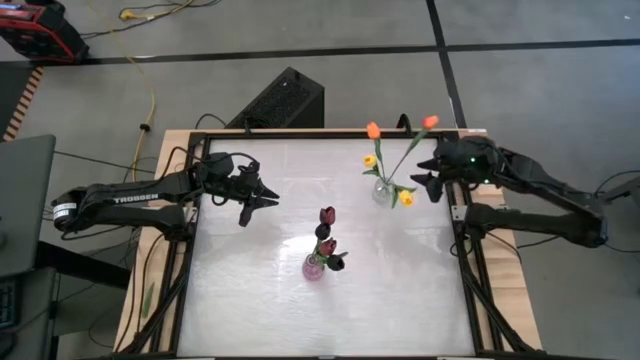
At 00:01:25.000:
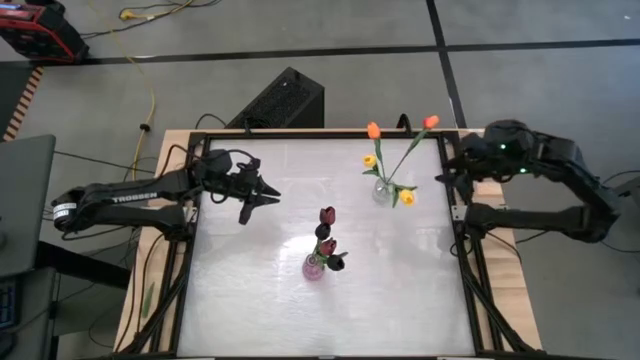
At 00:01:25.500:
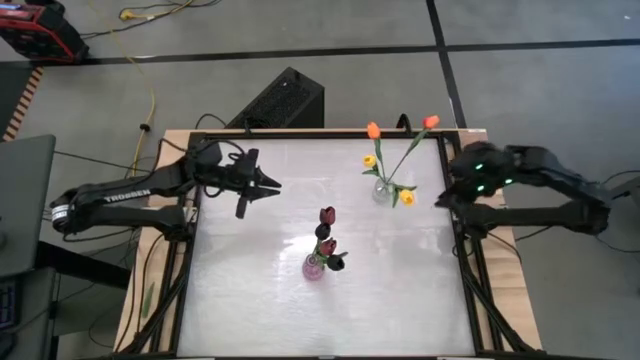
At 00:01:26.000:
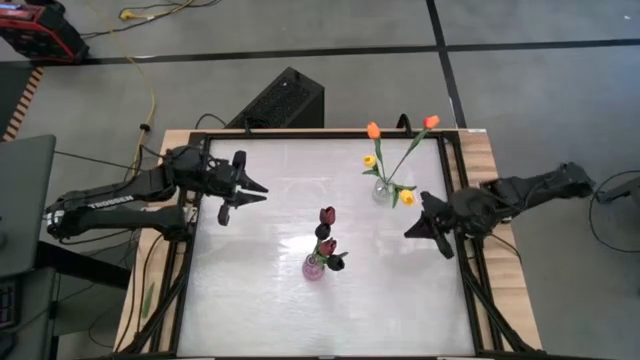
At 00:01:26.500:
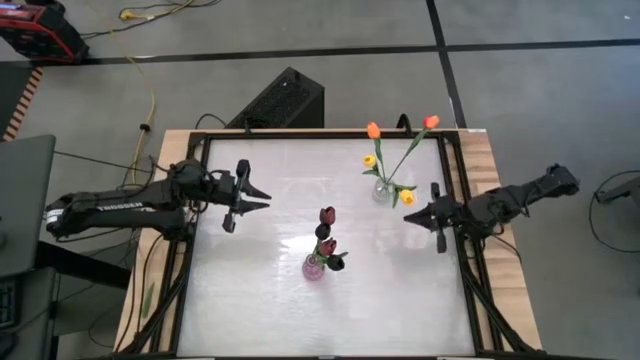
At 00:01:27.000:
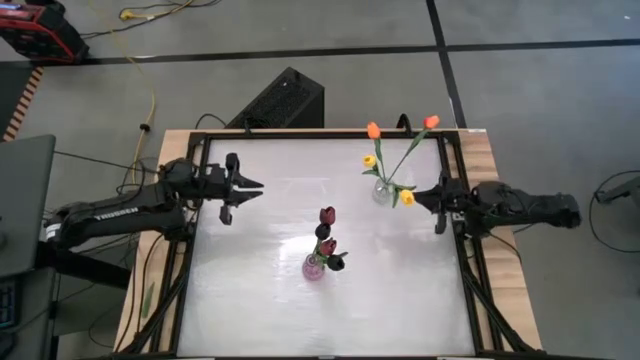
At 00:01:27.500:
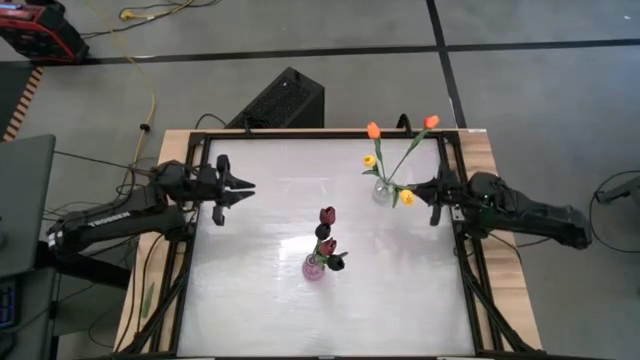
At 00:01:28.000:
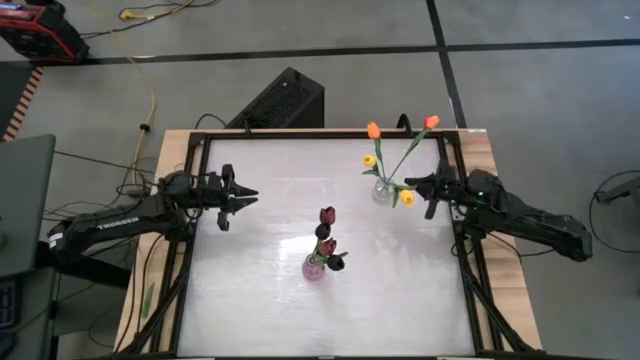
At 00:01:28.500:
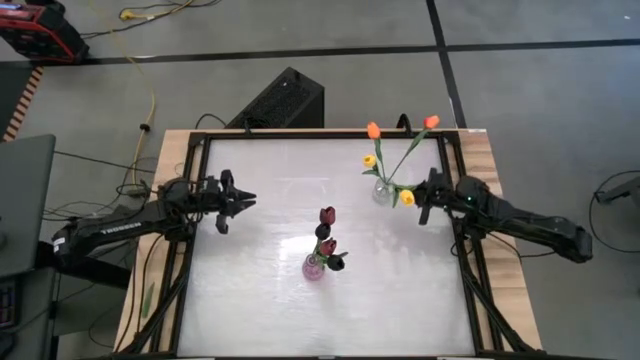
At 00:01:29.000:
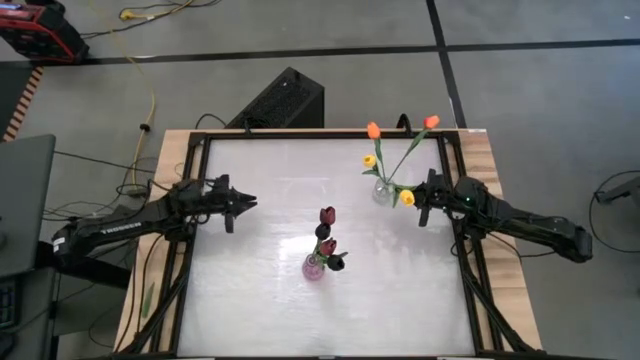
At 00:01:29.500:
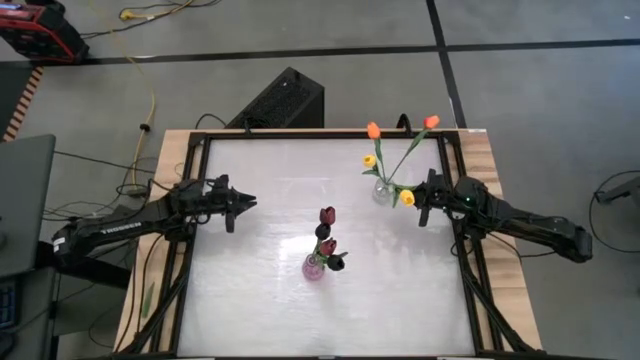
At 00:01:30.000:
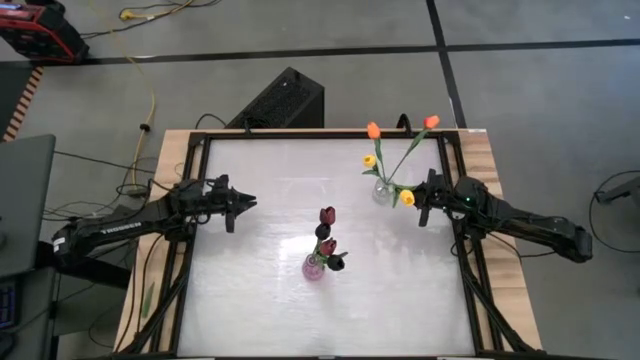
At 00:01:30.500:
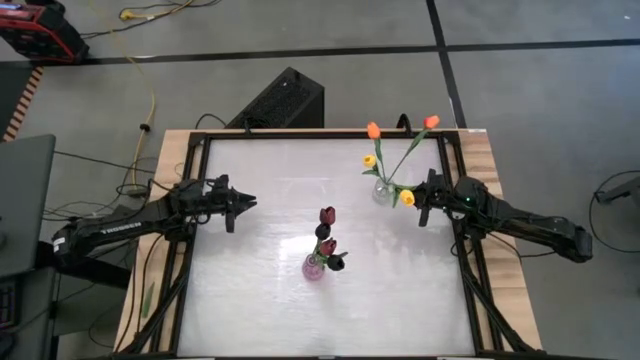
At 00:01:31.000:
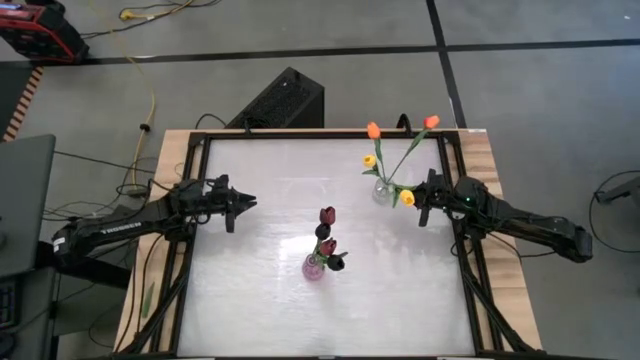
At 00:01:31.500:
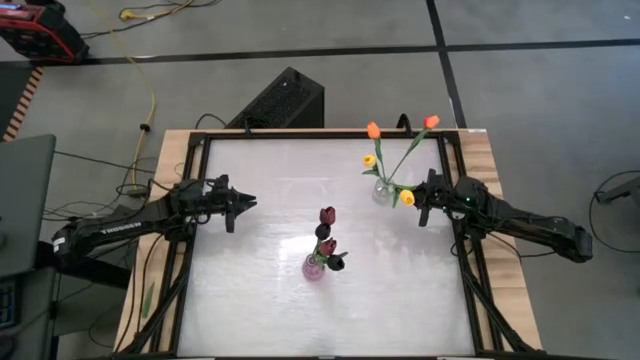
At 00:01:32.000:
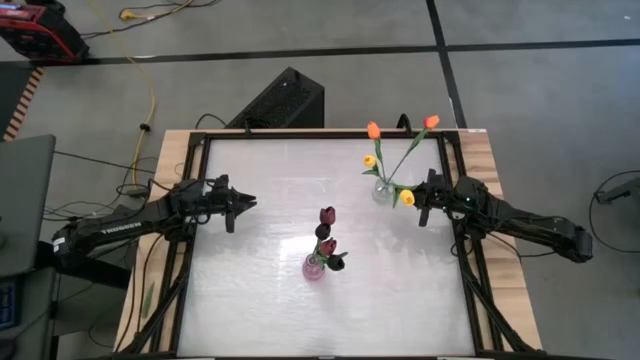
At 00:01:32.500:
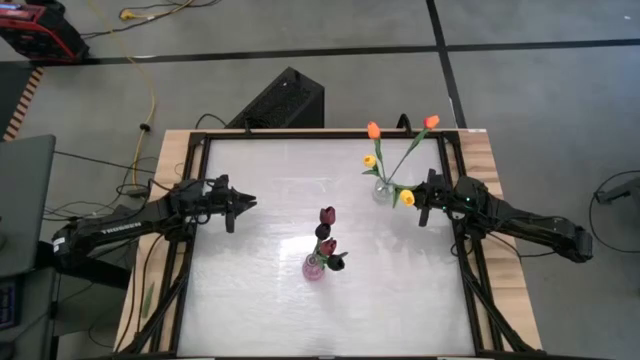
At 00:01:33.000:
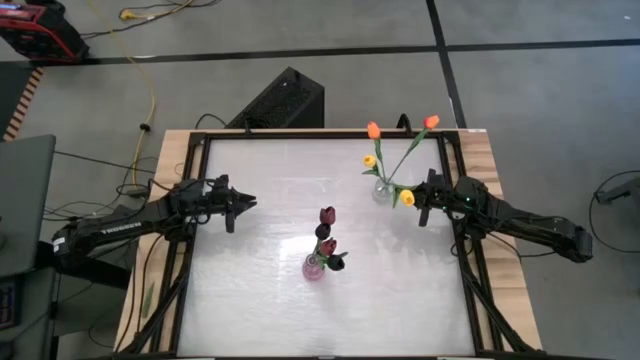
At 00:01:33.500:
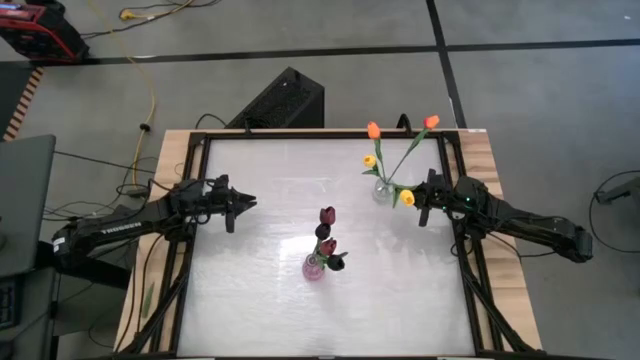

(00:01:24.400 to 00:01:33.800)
Task: Sort flowers into vase by color
Return to Home Position

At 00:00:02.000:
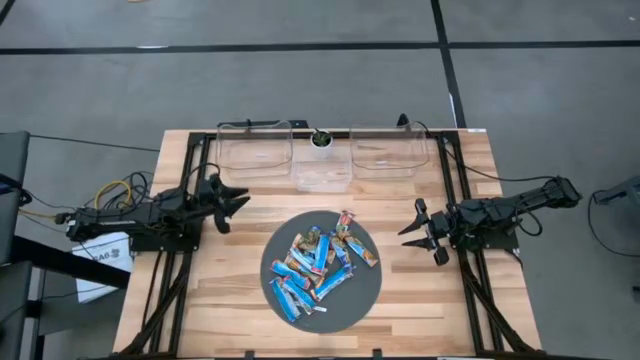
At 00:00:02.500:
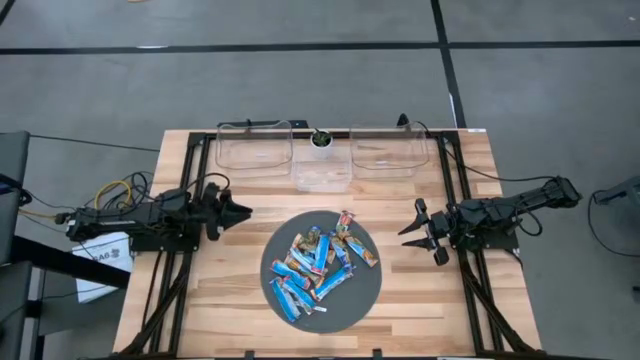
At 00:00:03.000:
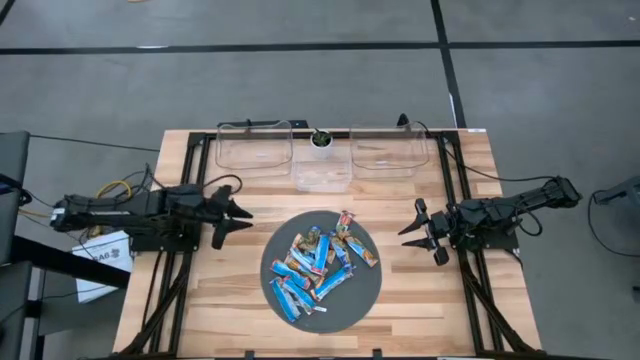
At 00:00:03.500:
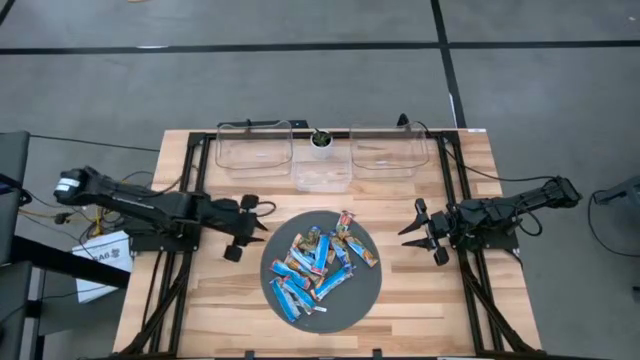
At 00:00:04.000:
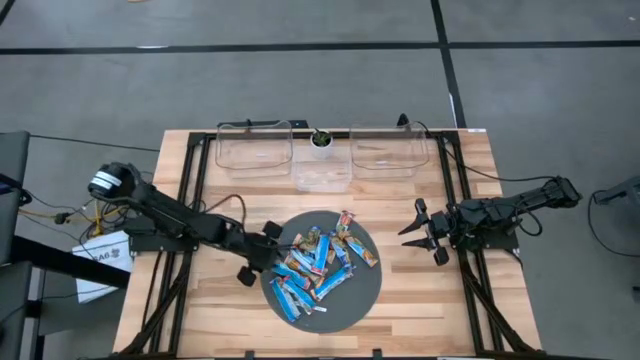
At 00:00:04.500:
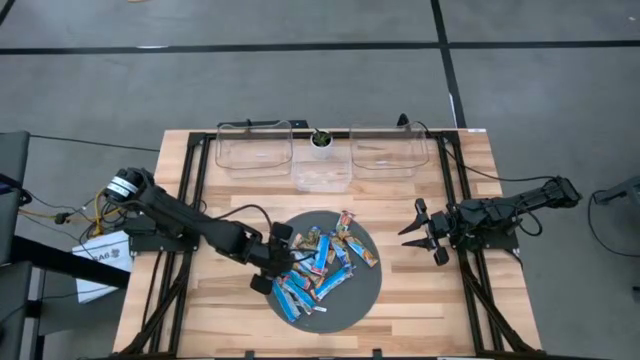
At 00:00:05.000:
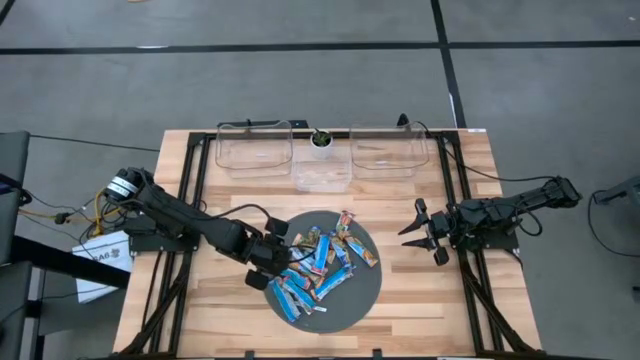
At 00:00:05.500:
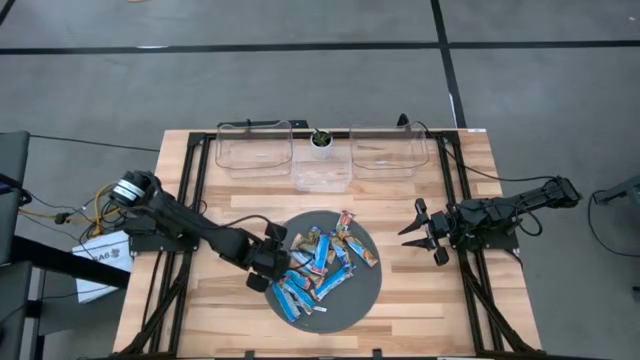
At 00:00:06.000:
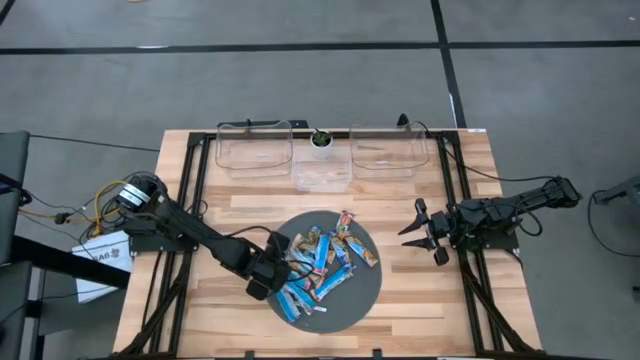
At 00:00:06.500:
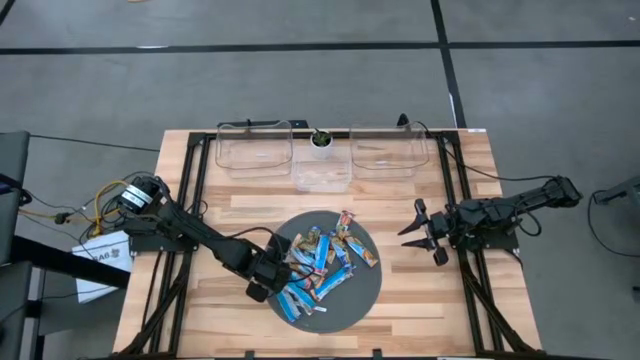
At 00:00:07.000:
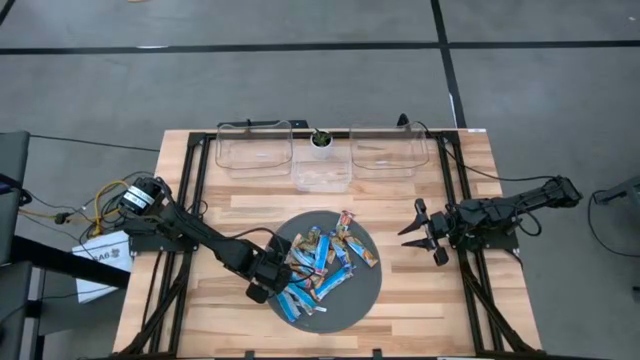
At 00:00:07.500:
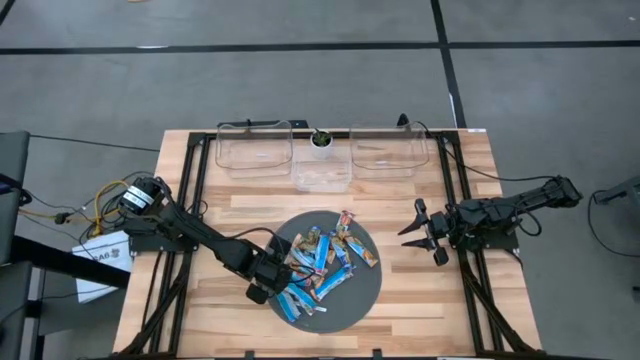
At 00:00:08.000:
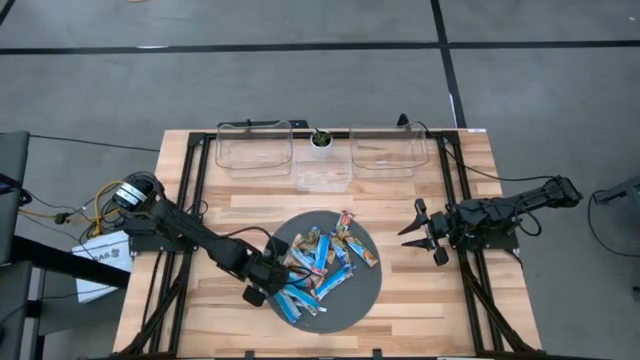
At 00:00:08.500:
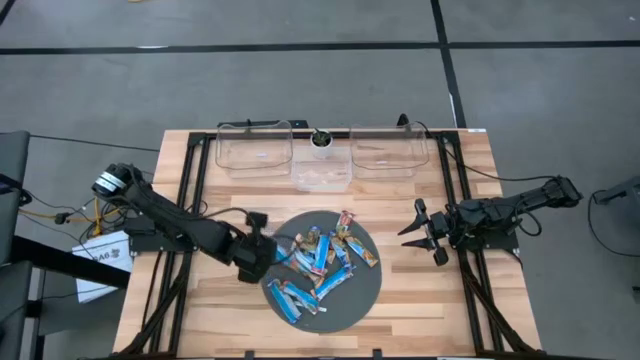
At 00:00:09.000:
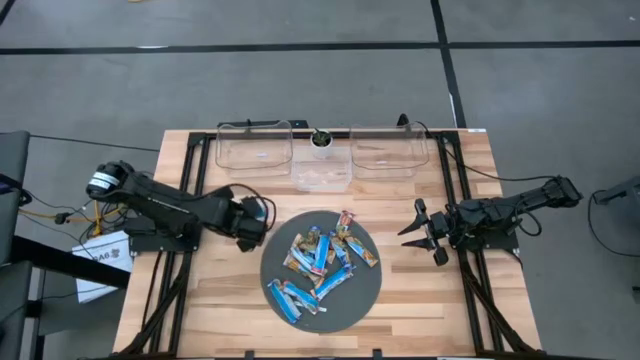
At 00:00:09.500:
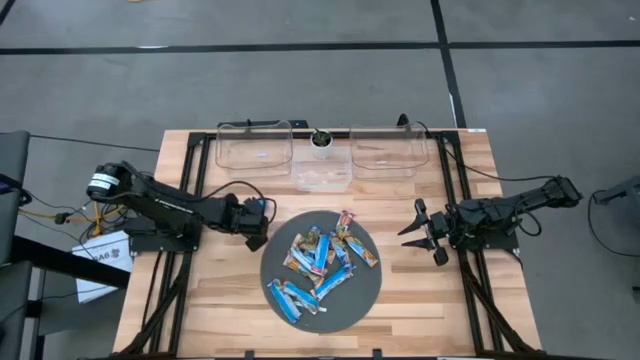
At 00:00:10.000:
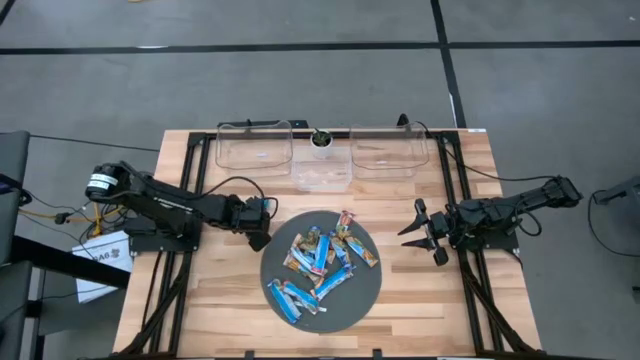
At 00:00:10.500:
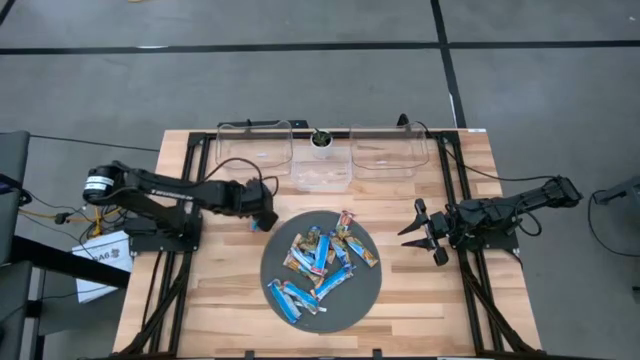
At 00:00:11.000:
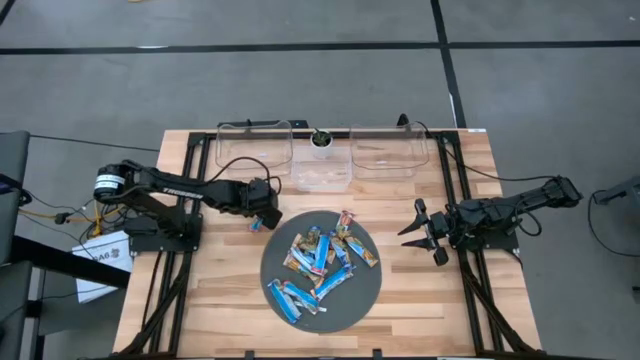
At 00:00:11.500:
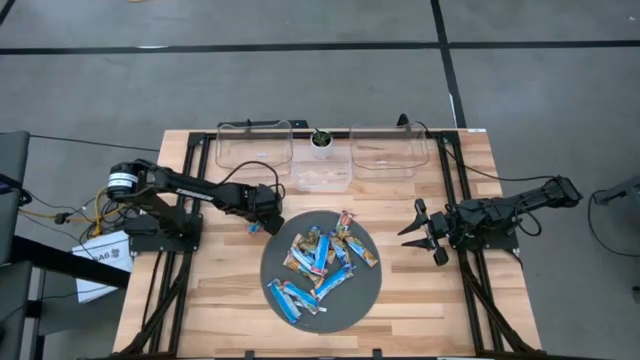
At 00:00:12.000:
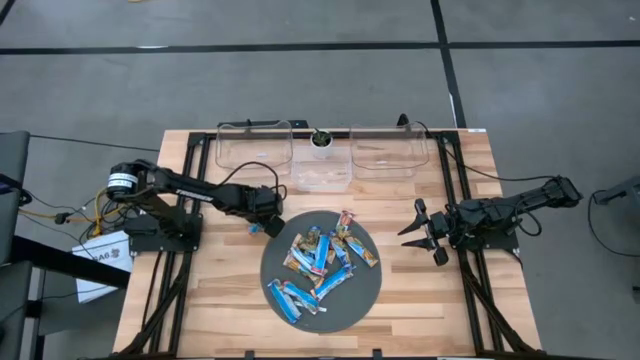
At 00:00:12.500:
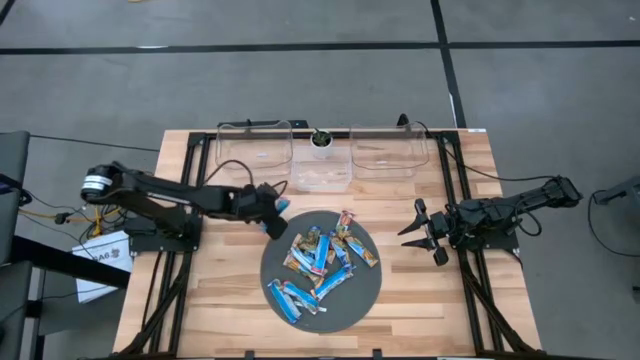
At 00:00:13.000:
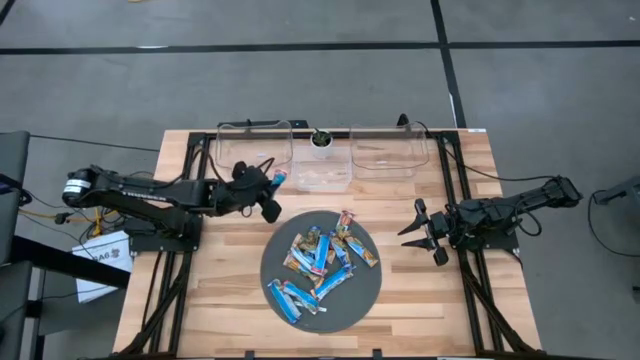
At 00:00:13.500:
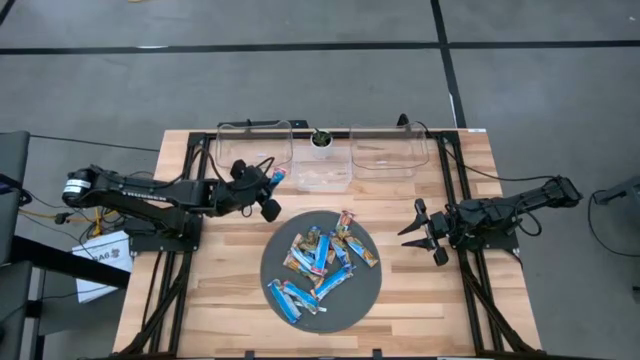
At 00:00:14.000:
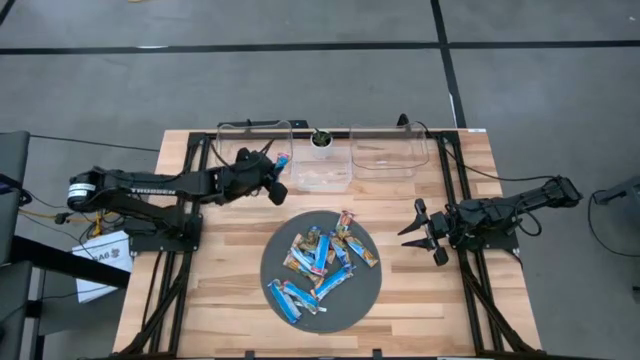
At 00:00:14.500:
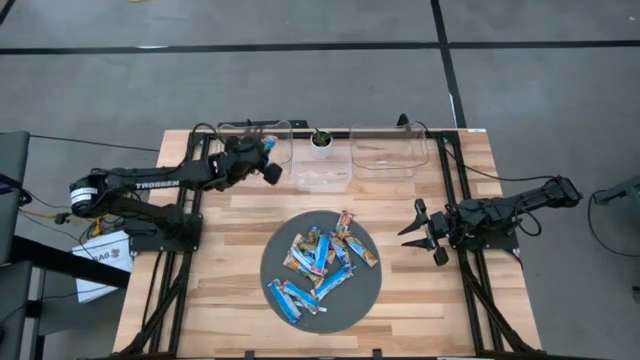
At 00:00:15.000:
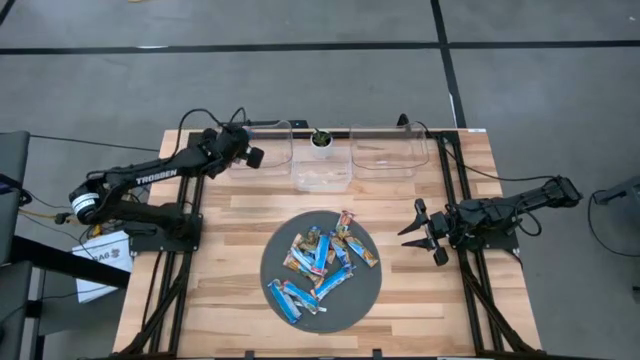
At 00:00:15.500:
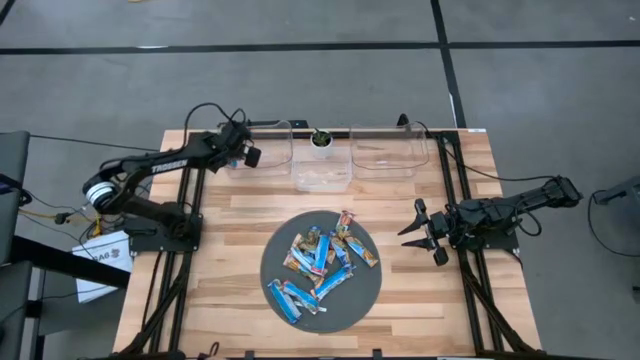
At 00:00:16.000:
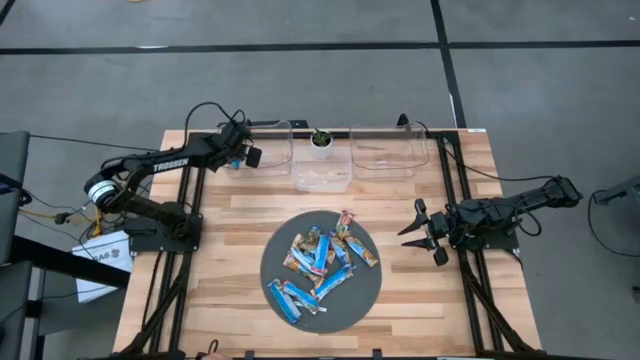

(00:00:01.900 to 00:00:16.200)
Task: Pick and place Granola Bars by type
Put the red granola bar into the left transparent bin
